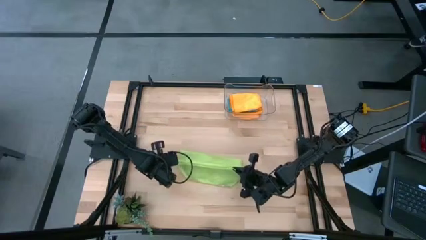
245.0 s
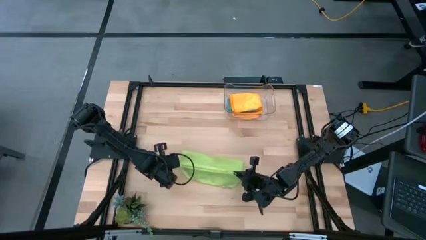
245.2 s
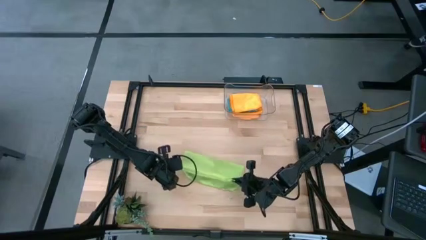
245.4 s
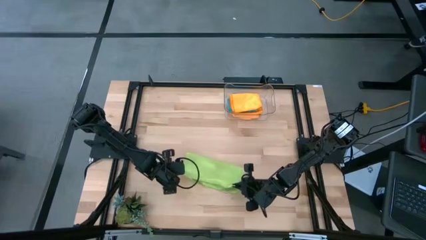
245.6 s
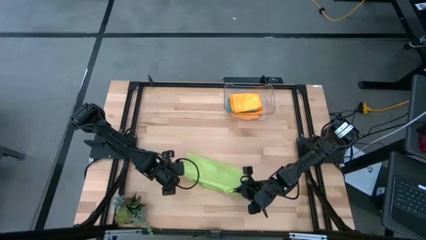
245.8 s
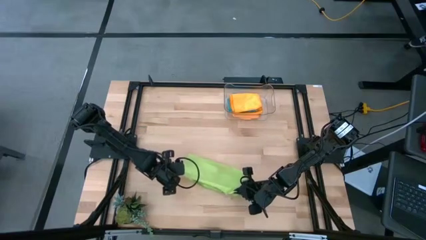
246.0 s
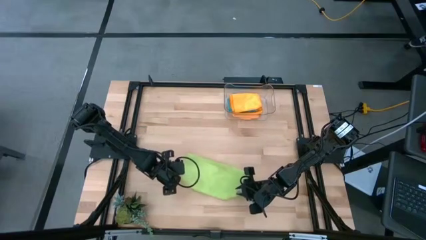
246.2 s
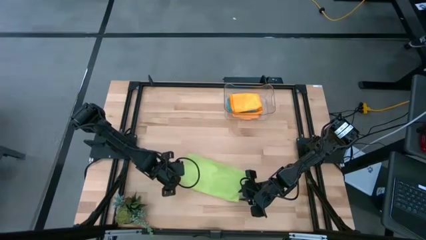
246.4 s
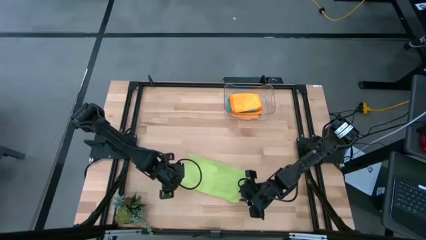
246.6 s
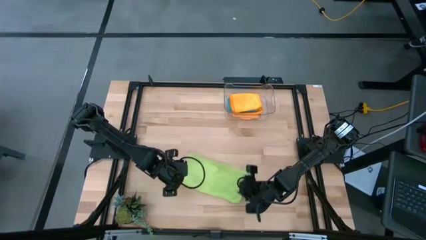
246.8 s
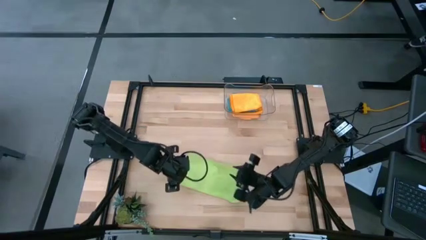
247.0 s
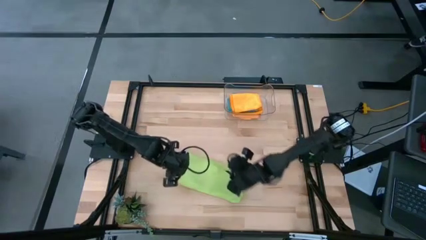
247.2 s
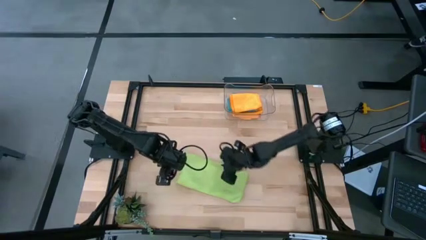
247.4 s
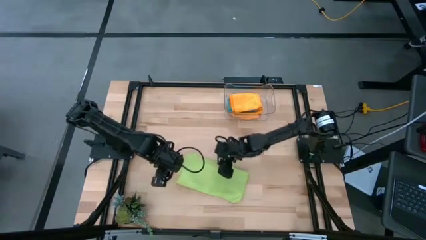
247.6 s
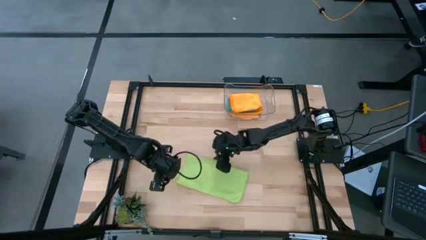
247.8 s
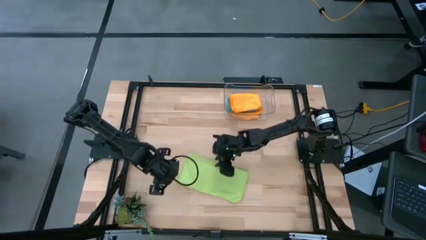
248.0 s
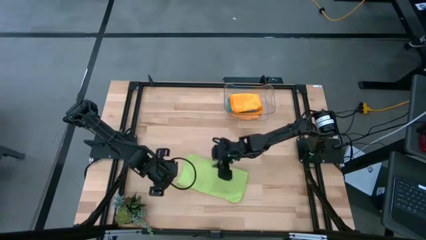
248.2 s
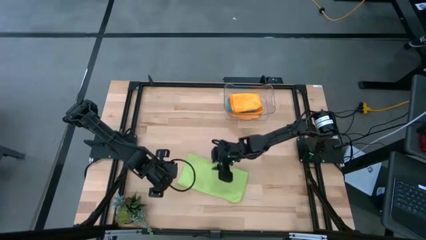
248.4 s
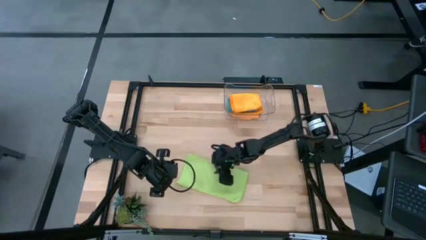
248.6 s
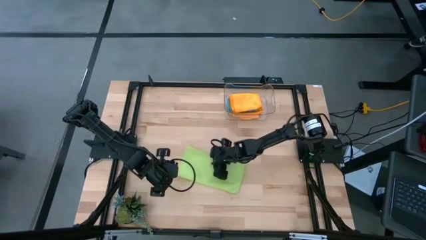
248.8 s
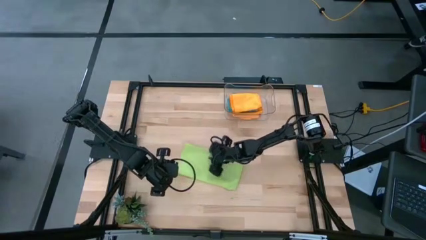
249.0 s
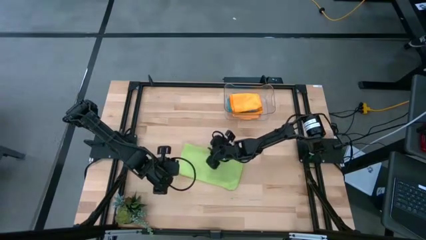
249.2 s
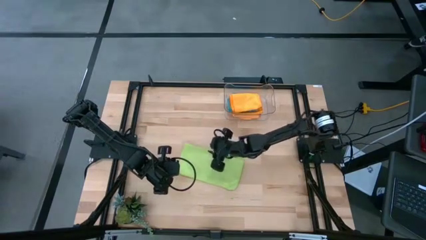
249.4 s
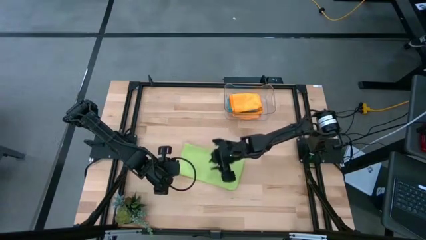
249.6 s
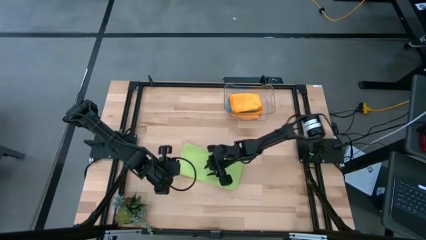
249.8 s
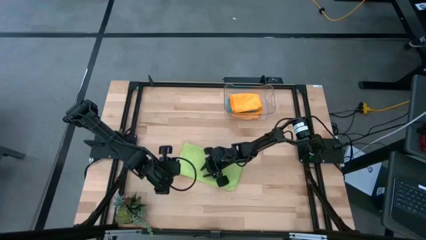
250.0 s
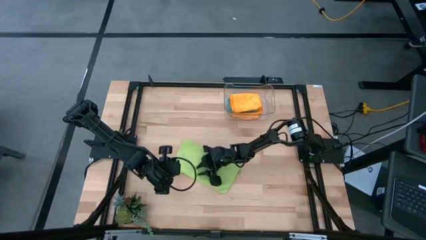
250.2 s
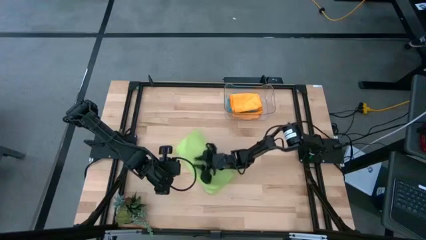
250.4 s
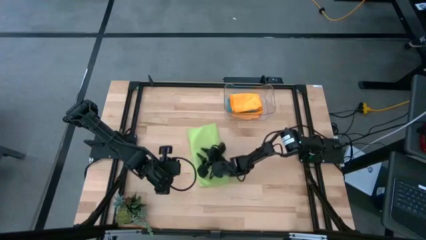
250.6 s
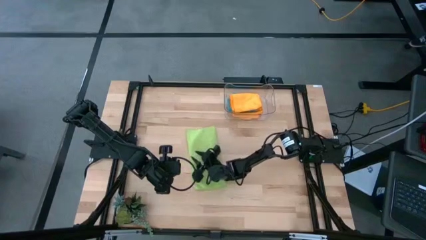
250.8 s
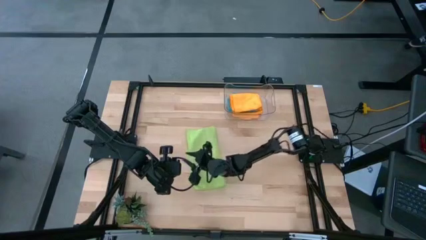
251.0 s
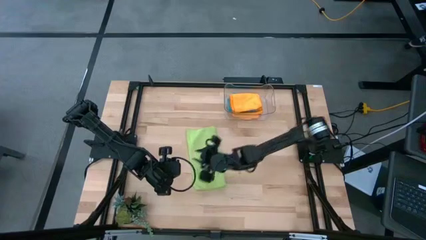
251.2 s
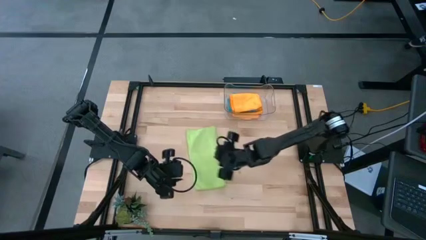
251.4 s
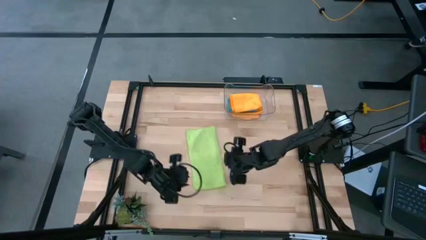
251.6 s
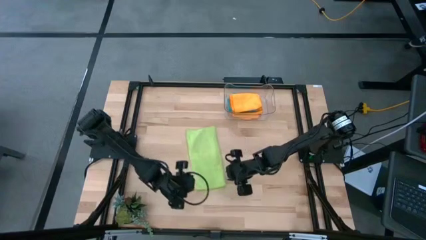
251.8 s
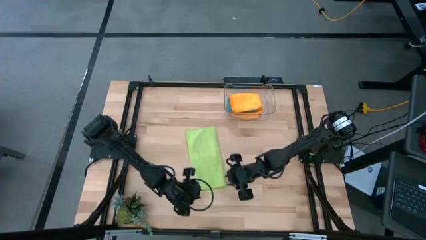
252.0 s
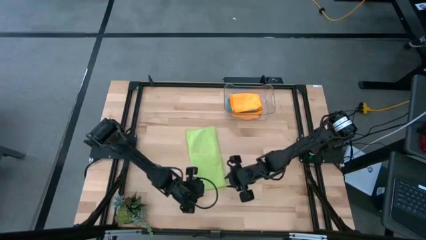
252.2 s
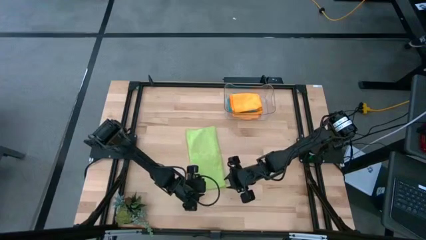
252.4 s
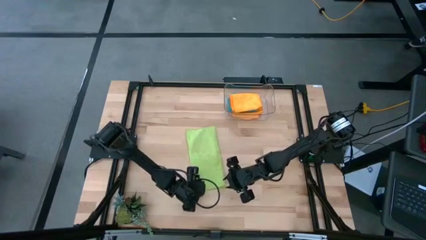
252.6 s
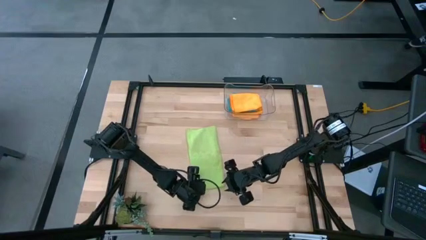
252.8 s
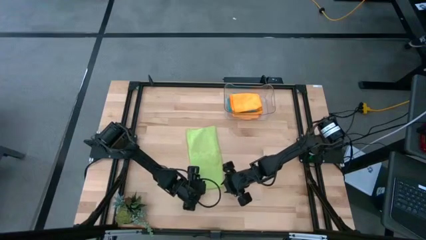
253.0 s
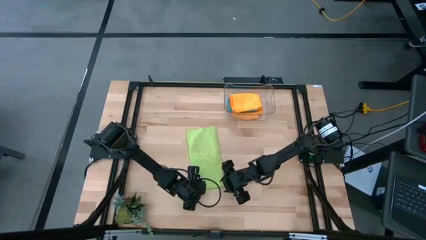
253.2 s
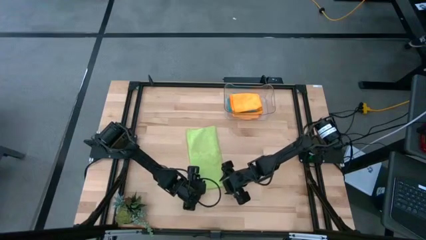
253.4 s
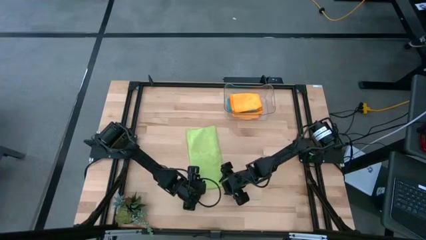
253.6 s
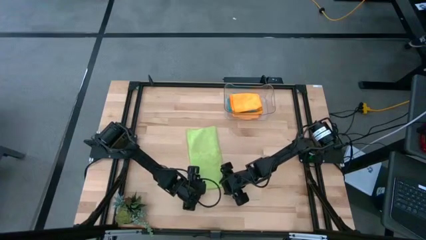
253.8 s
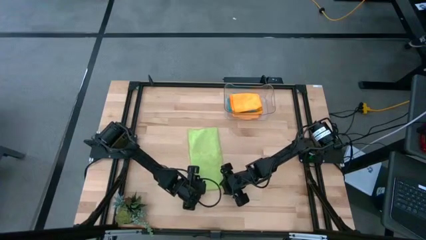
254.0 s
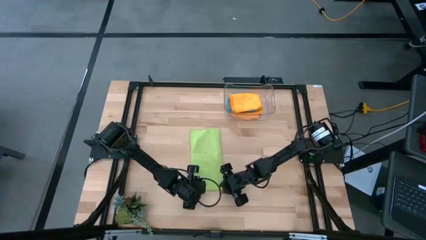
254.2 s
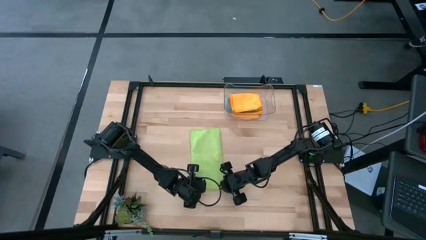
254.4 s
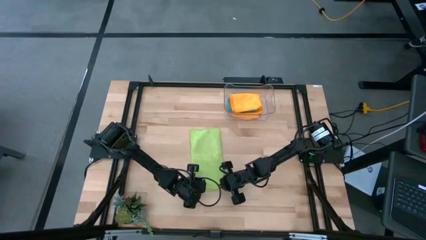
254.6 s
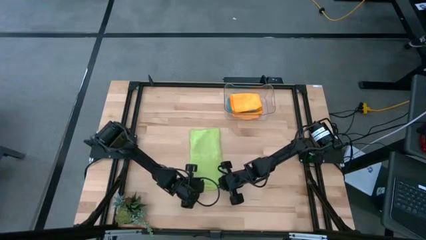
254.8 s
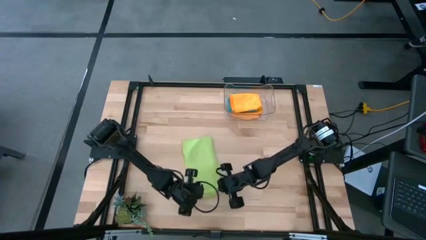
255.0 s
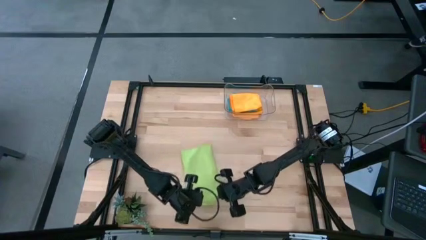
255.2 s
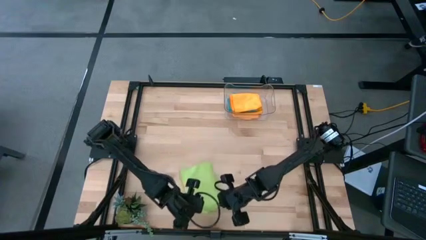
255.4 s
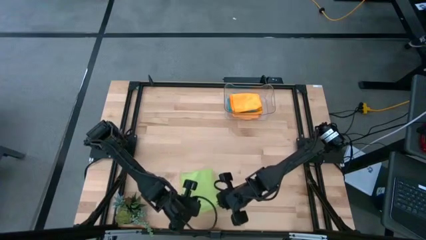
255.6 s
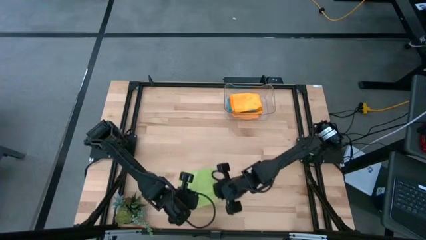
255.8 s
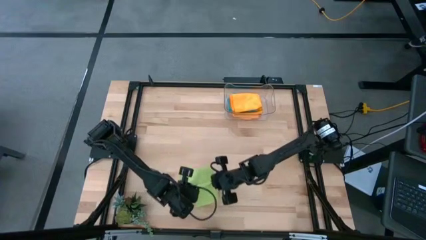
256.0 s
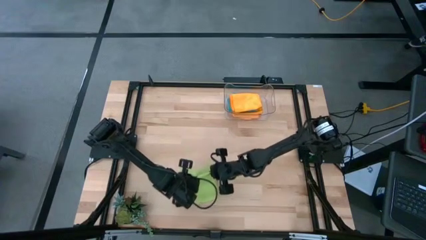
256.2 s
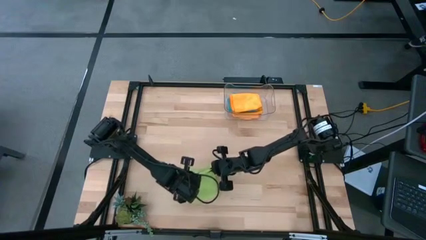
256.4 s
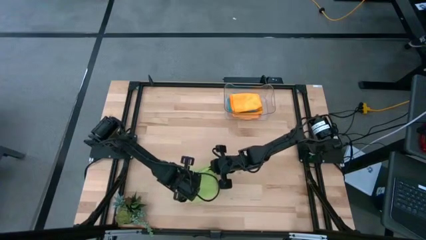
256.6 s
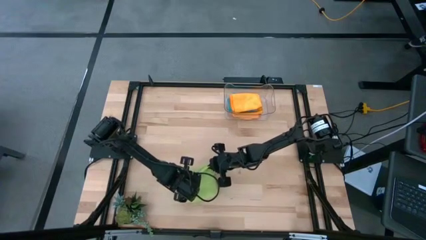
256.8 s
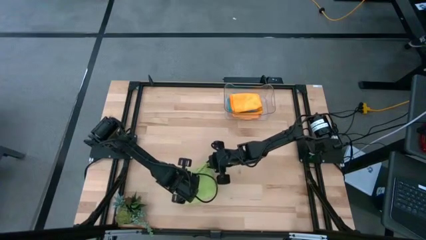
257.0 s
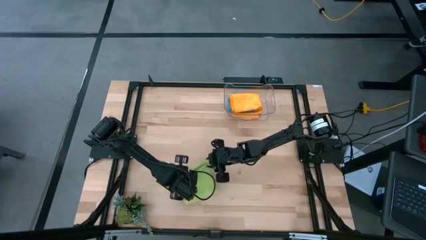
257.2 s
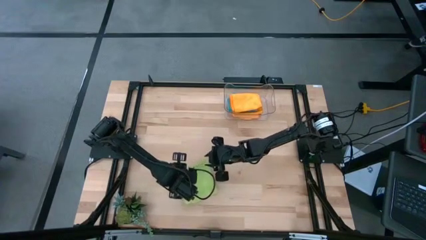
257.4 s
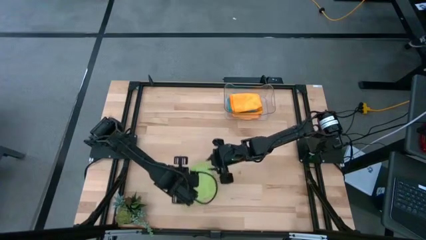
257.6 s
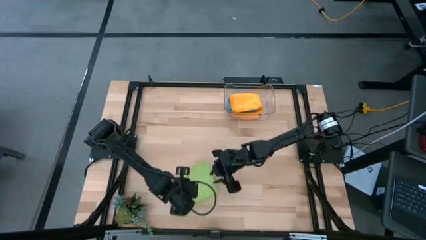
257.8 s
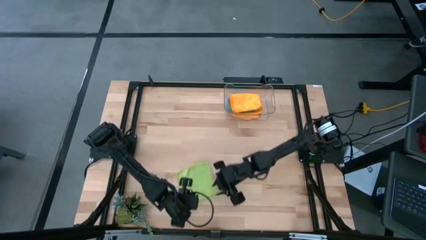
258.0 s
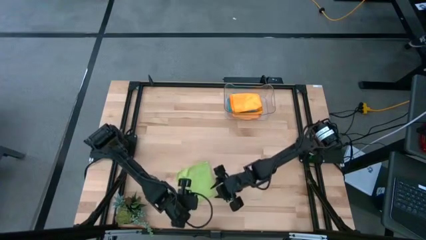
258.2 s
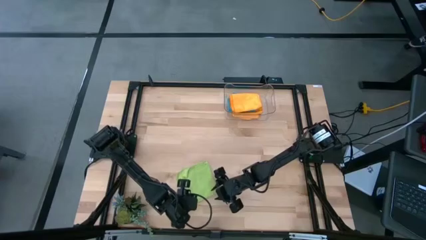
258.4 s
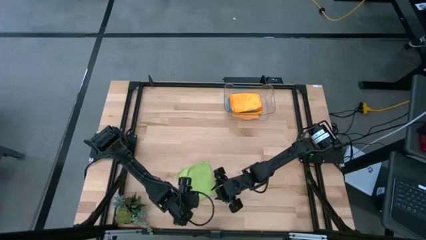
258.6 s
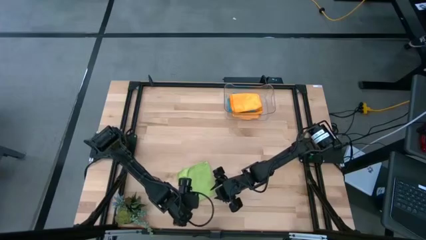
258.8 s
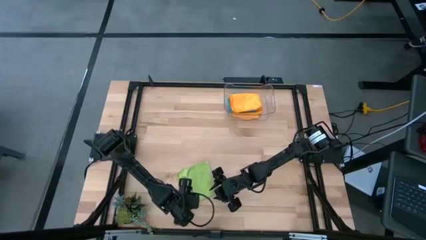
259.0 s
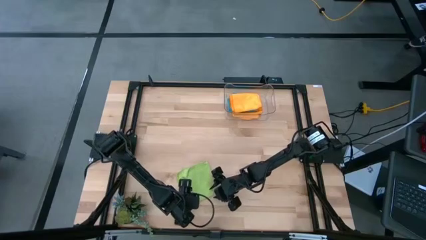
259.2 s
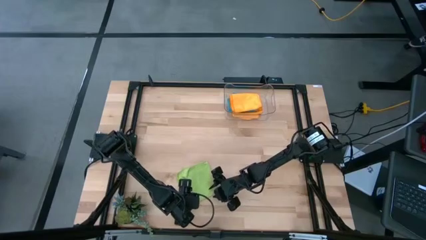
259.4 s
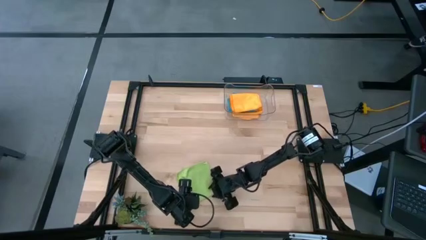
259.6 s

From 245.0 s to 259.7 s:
Task: Fold microfiber towels
Fold the green microfiber towel
